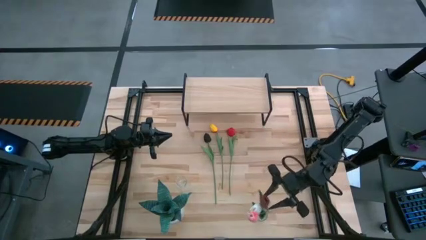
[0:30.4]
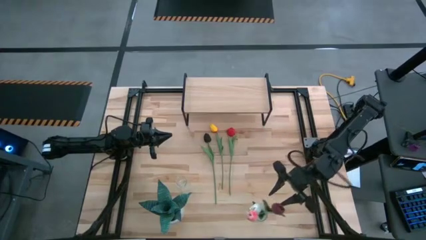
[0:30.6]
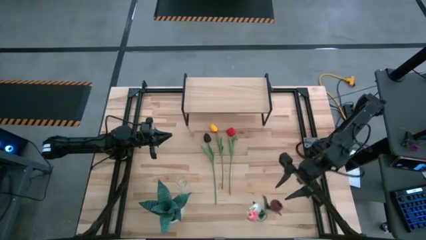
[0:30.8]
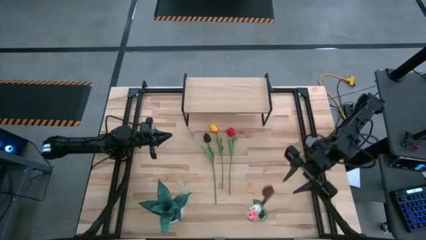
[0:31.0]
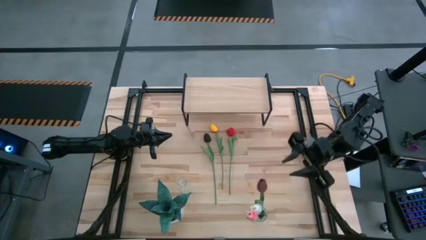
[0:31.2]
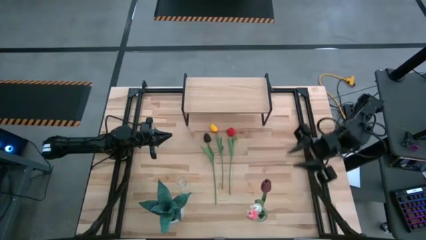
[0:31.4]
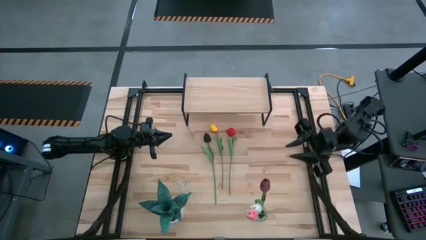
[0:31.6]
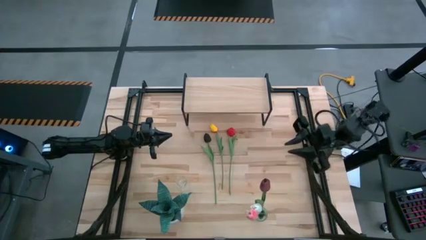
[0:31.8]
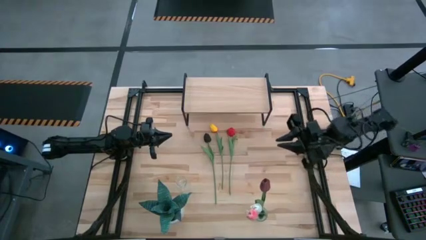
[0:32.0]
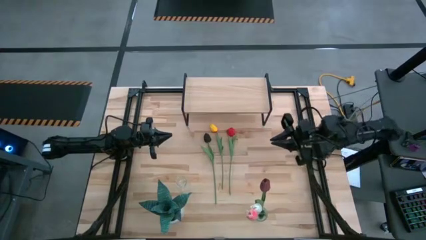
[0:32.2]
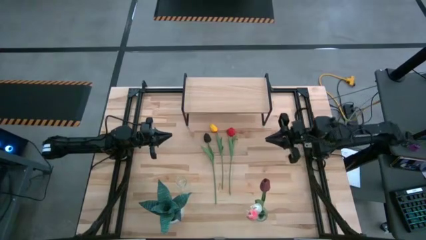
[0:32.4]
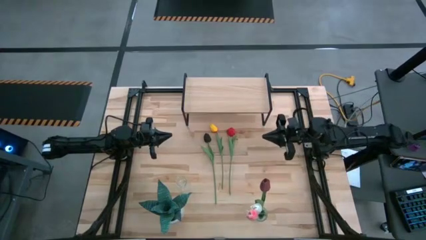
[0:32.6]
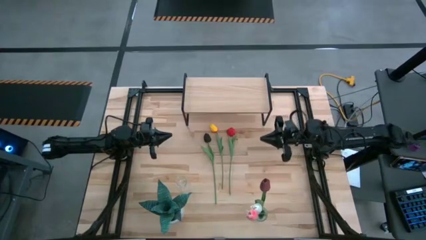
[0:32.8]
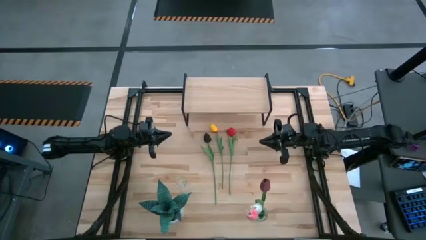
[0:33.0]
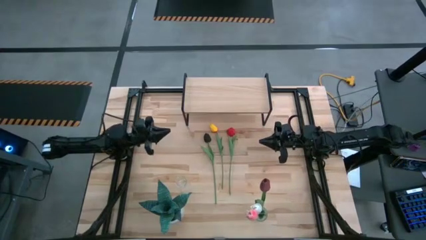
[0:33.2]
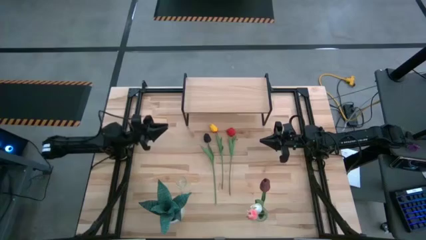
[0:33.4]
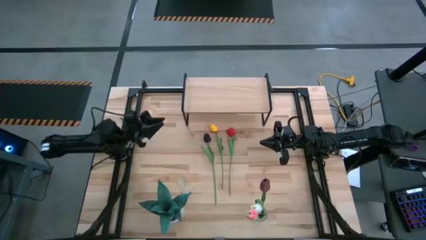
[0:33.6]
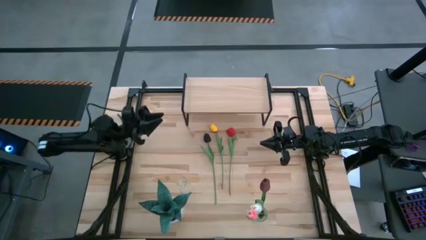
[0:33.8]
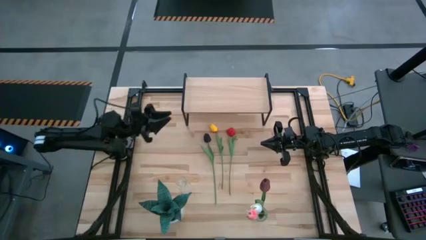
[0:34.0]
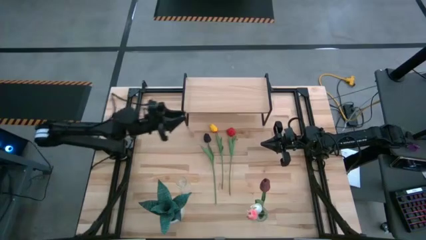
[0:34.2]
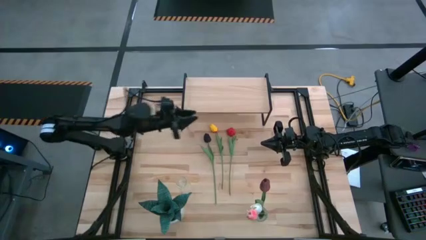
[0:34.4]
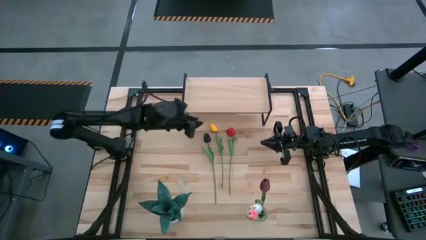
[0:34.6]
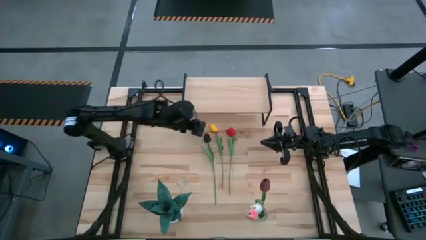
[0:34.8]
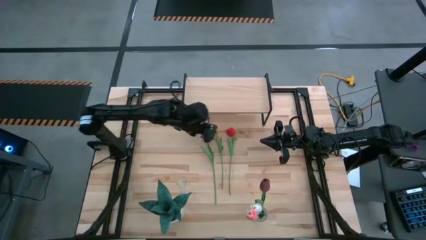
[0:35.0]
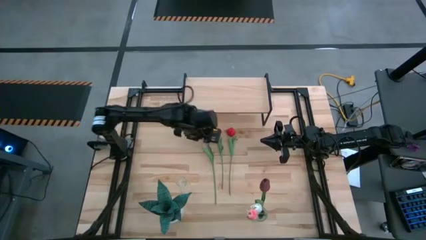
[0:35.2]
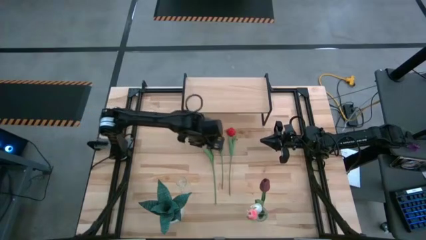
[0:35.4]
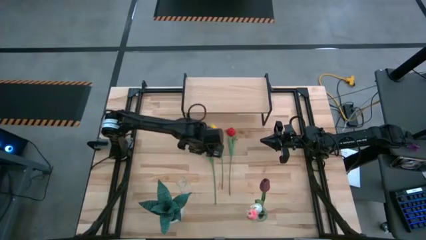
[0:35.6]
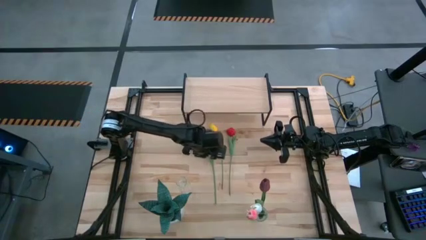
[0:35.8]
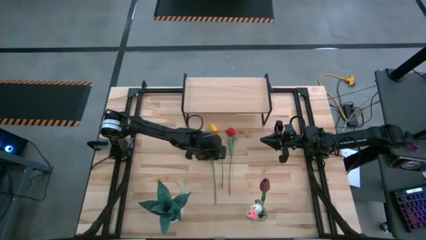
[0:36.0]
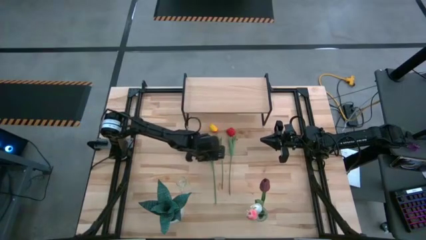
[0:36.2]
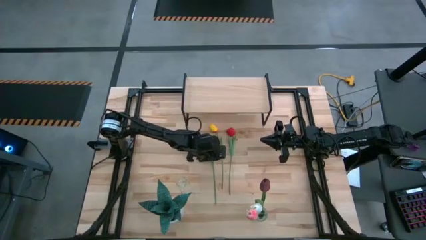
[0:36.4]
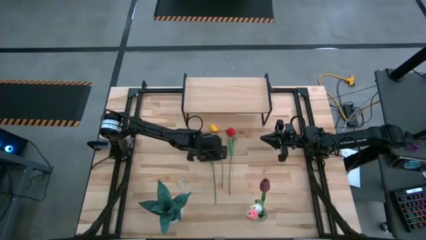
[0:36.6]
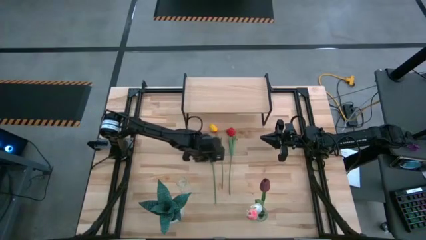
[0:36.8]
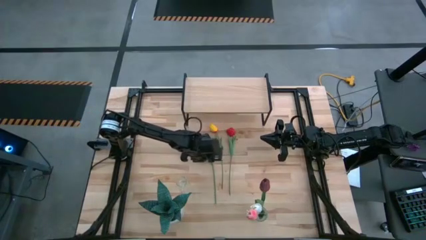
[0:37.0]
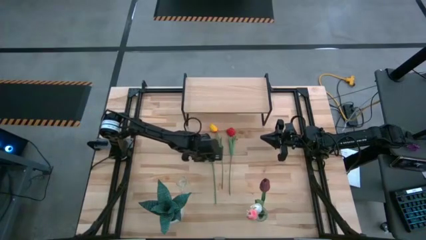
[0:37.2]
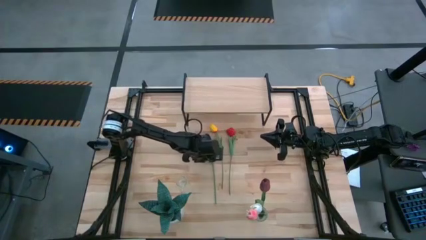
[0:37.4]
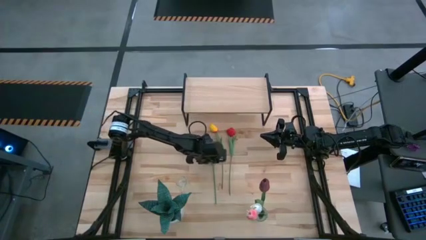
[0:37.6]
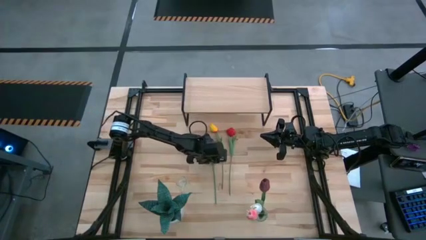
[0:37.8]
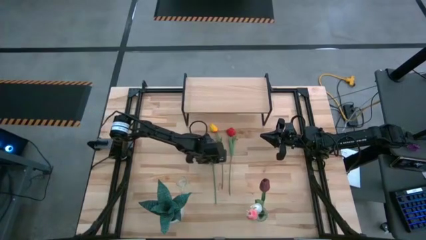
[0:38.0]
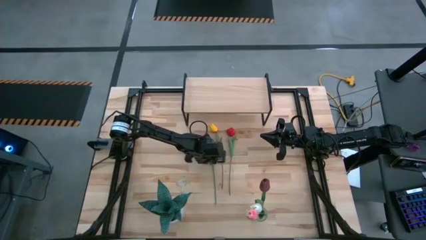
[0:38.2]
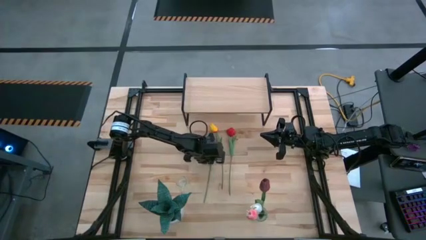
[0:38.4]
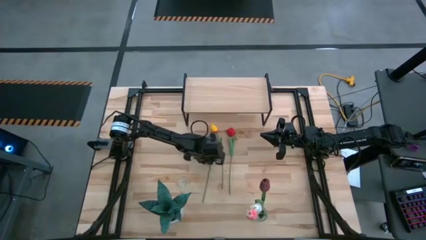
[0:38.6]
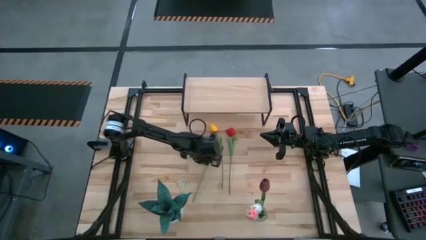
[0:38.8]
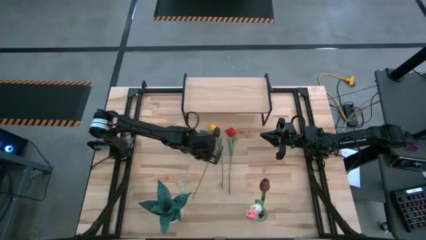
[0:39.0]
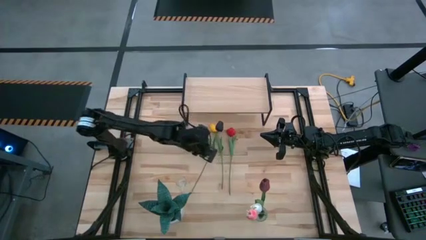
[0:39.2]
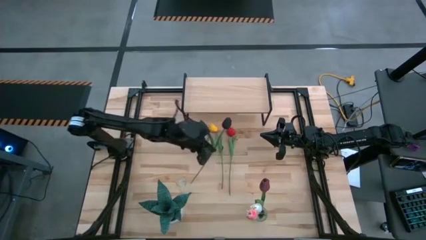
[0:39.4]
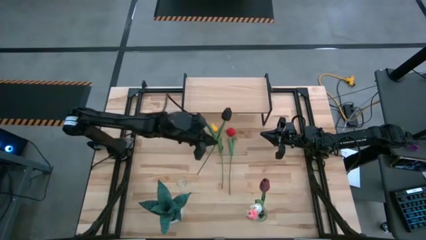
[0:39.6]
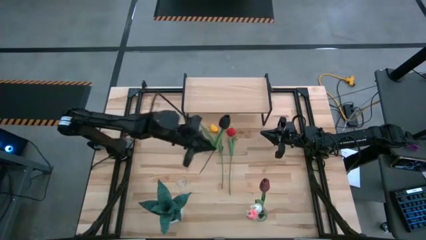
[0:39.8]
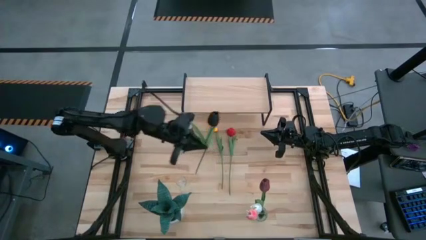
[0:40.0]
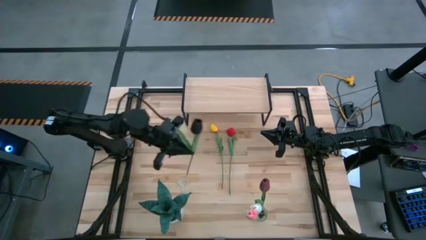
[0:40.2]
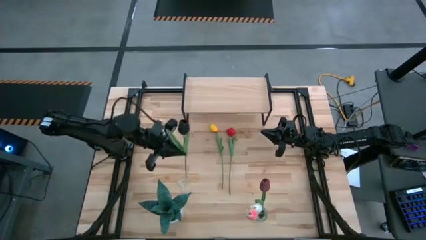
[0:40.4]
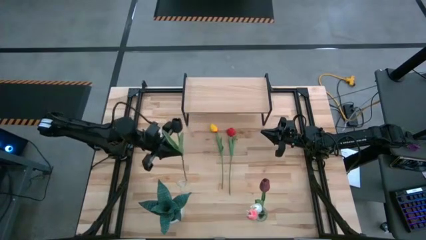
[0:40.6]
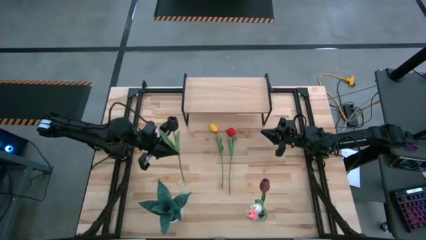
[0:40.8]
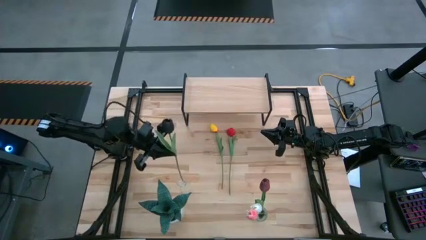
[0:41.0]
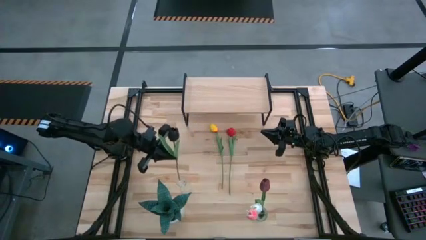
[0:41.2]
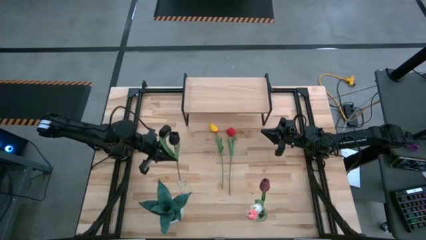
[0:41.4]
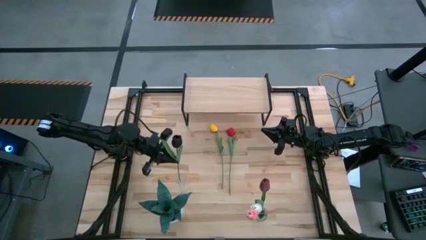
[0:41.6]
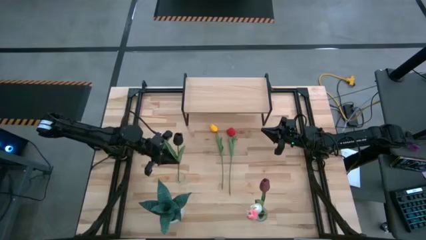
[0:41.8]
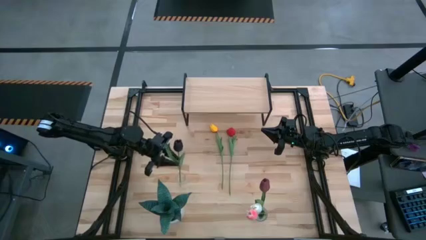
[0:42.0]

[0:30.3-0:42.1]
Task: Pick and place flowers into a vace then onto a shelf
Put the black flower into the top transparent vase

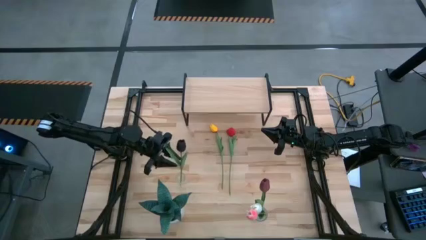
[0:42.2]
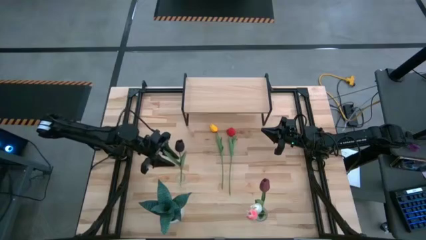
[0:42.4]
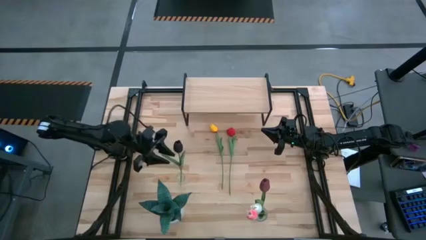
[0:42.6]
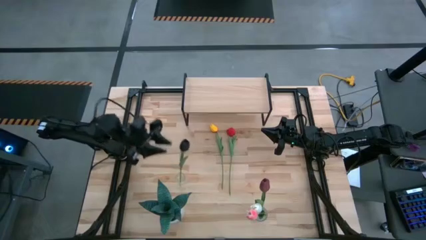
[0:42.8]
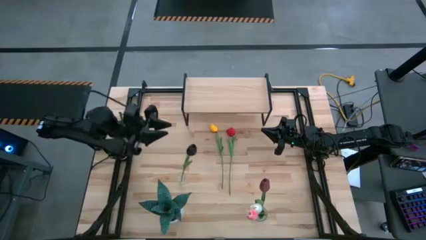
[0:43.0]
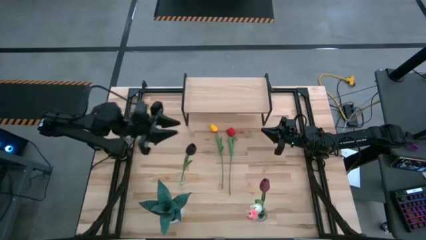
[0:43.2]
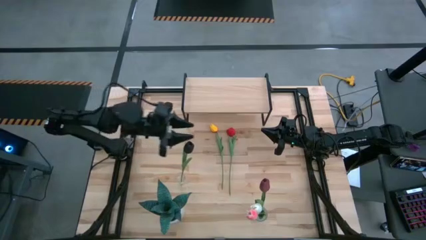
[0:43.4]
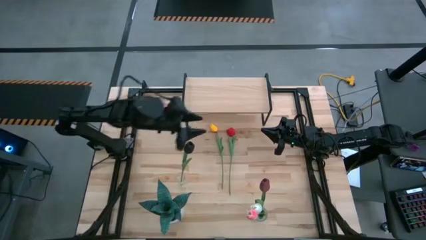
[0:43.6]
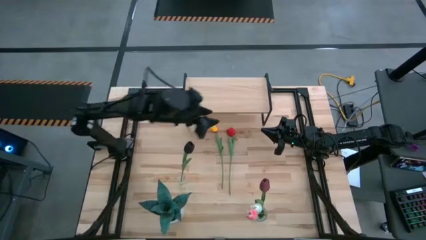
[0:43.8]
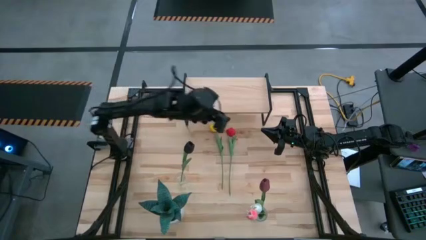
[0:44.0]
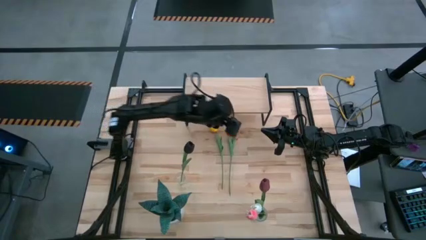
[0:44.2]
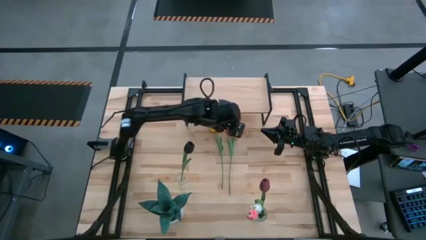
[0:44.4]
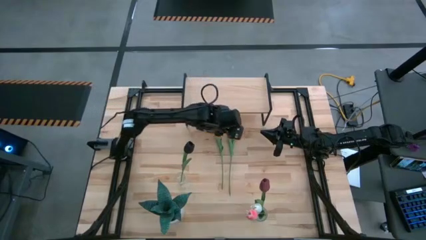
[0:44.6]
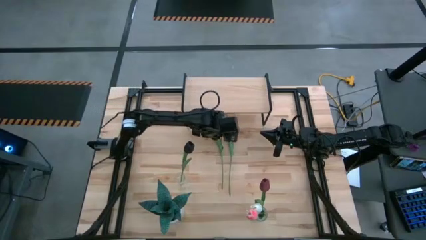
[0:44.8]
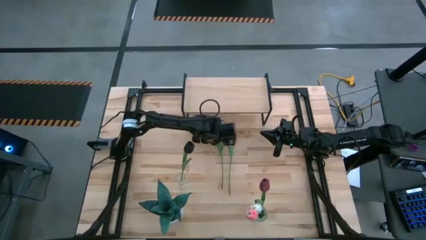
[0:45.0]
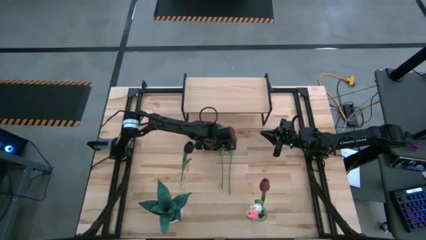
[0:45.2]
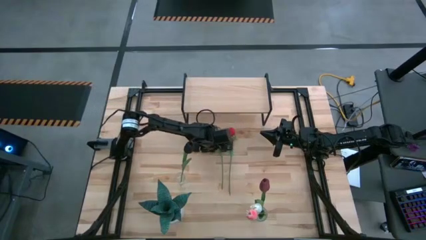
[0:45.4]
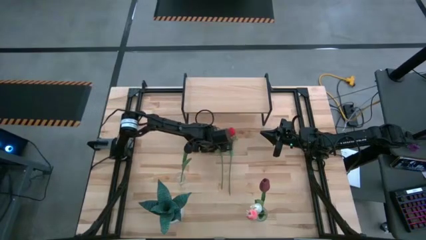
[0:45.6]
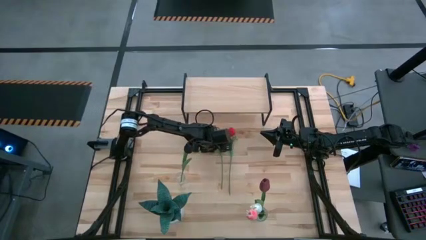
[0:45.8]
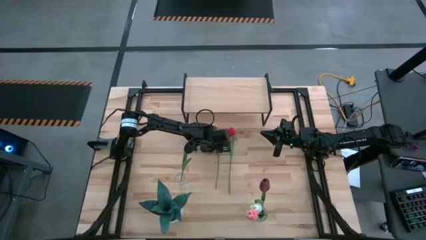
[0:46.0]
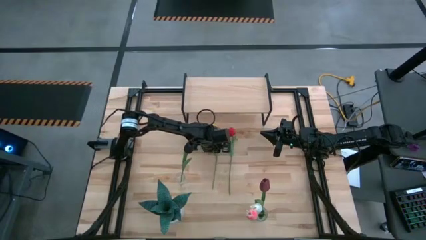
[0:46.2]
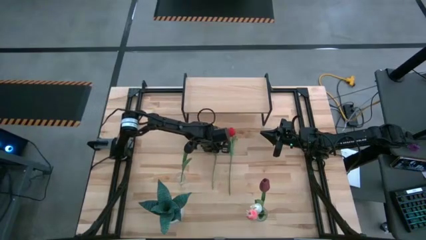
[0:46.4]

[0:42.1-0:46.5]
Put the yellow flower into the top transparent vase
